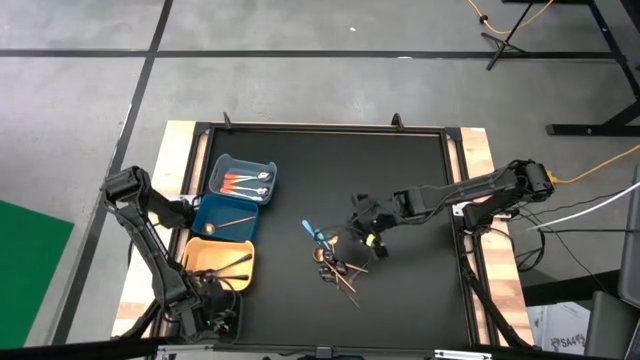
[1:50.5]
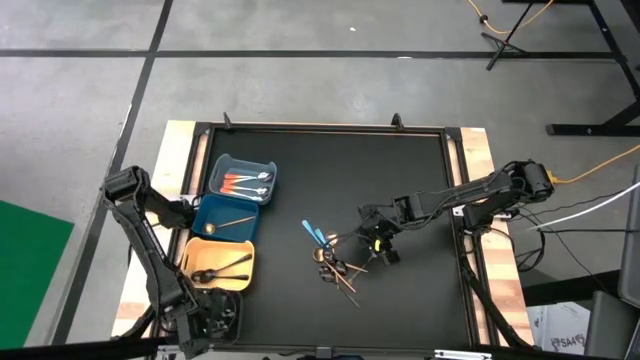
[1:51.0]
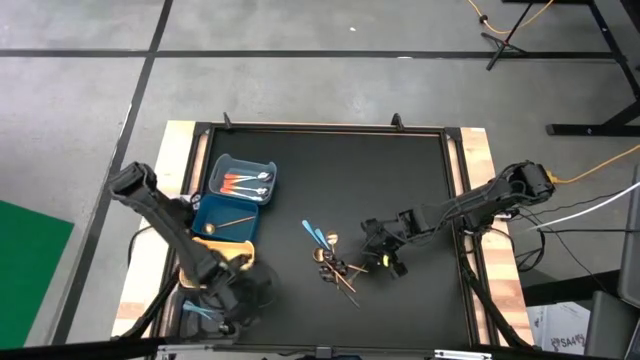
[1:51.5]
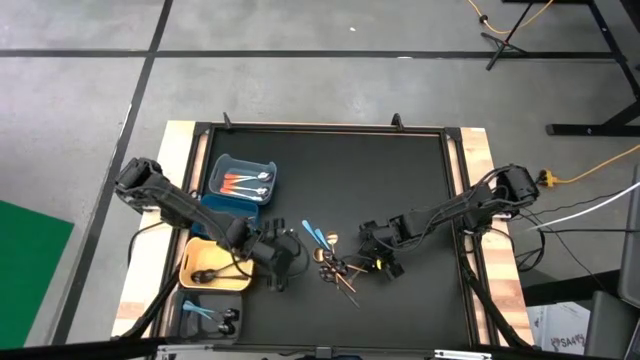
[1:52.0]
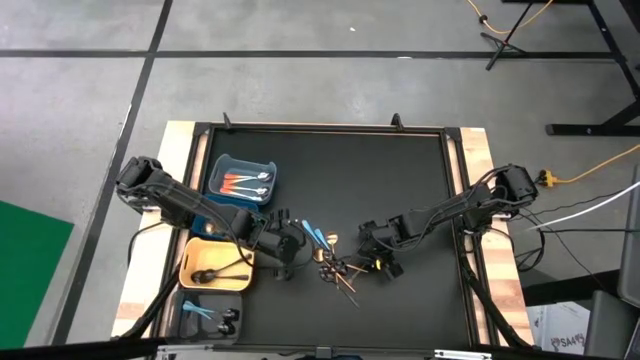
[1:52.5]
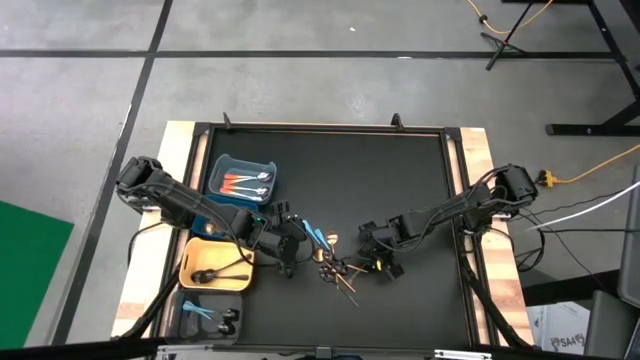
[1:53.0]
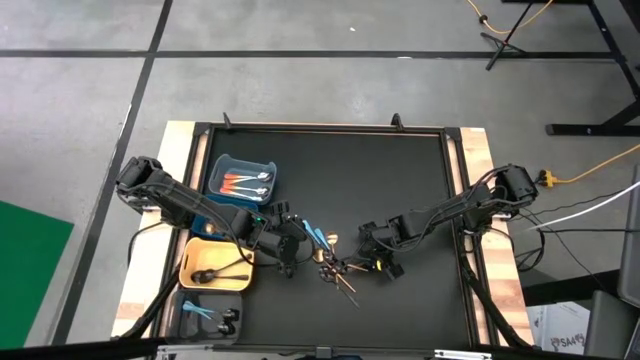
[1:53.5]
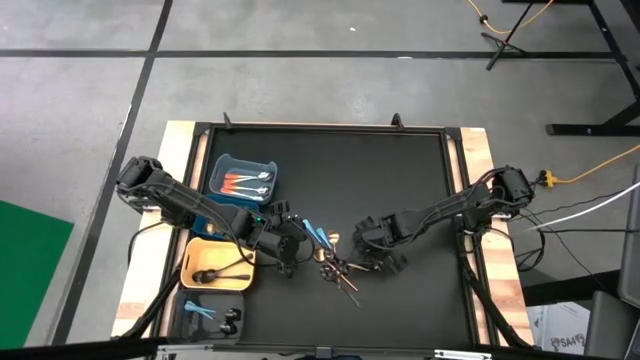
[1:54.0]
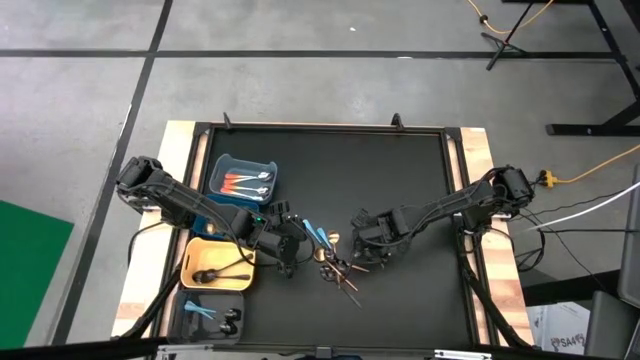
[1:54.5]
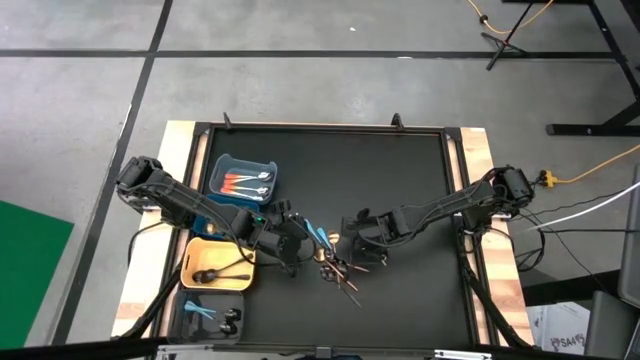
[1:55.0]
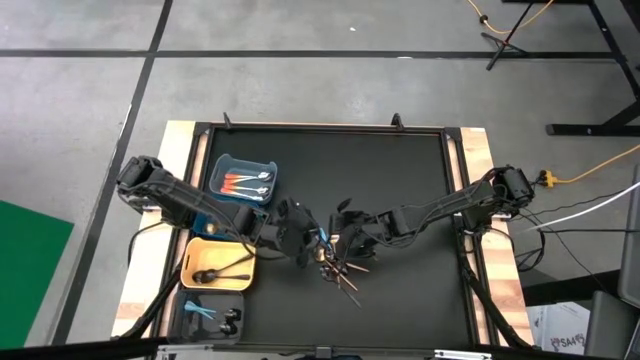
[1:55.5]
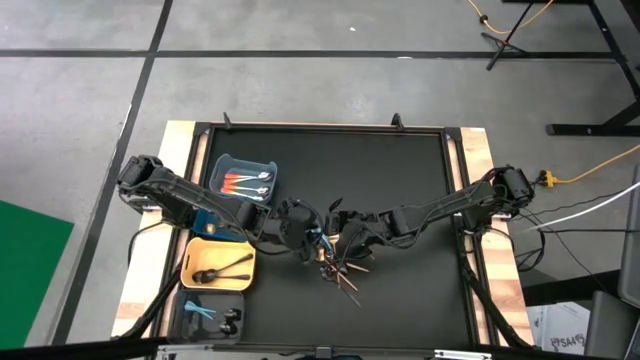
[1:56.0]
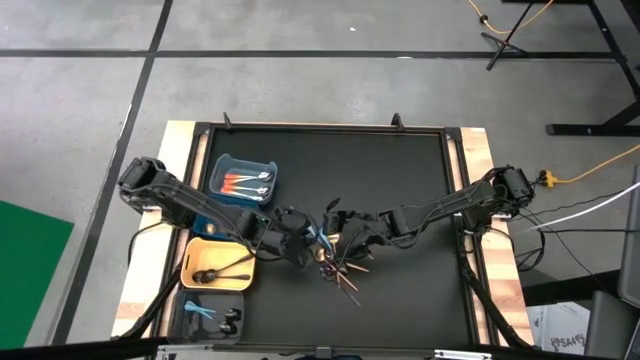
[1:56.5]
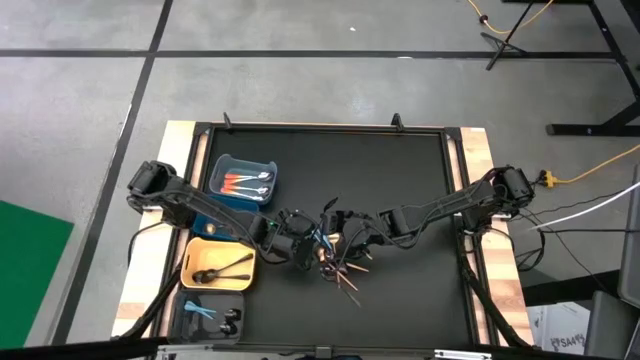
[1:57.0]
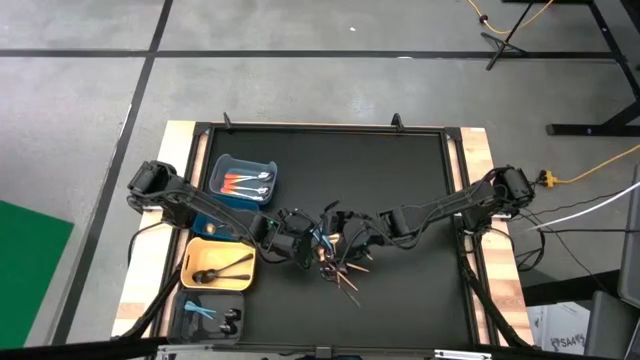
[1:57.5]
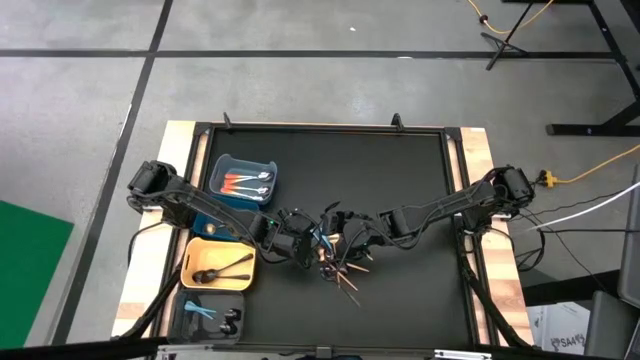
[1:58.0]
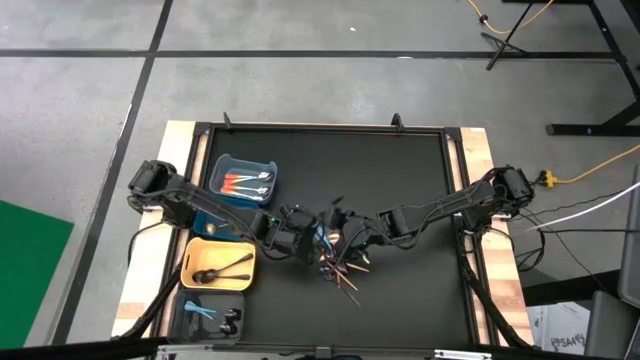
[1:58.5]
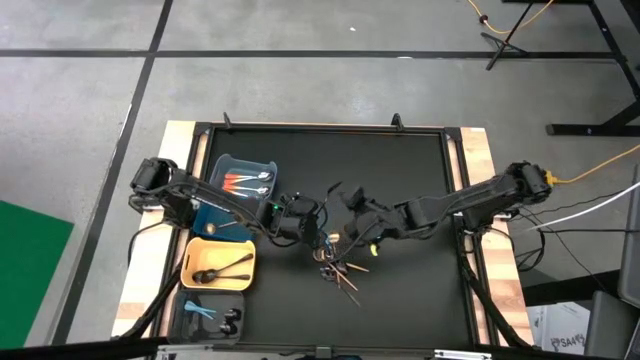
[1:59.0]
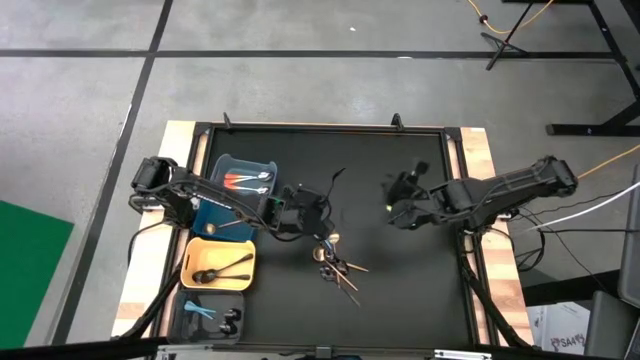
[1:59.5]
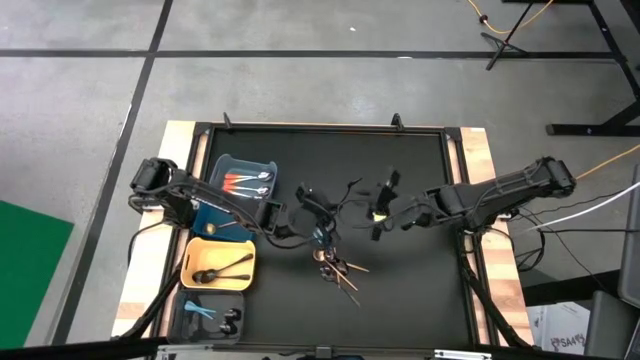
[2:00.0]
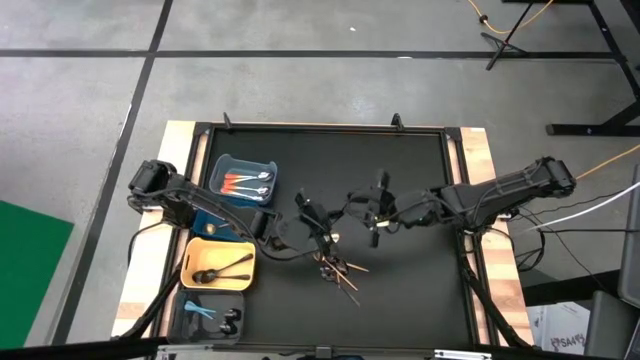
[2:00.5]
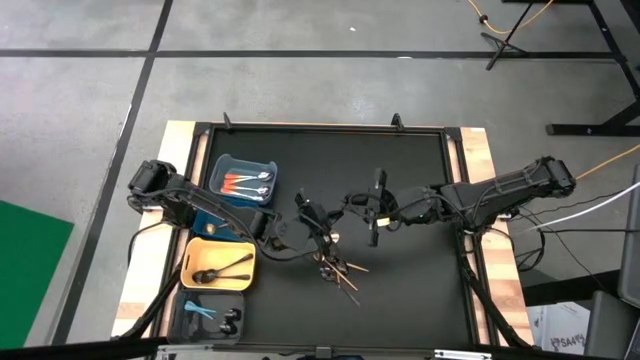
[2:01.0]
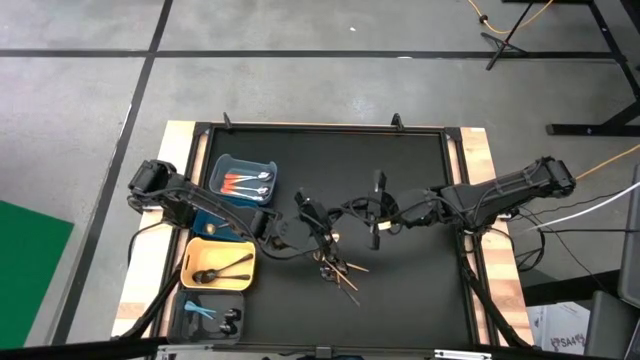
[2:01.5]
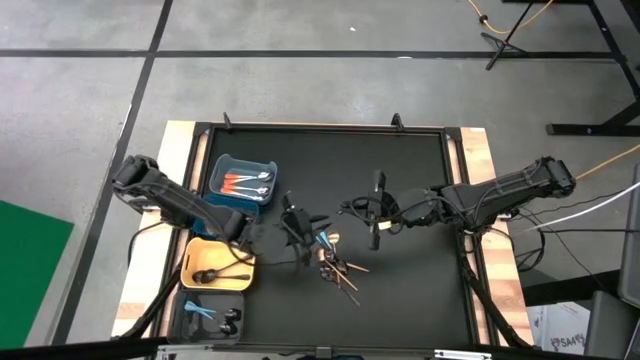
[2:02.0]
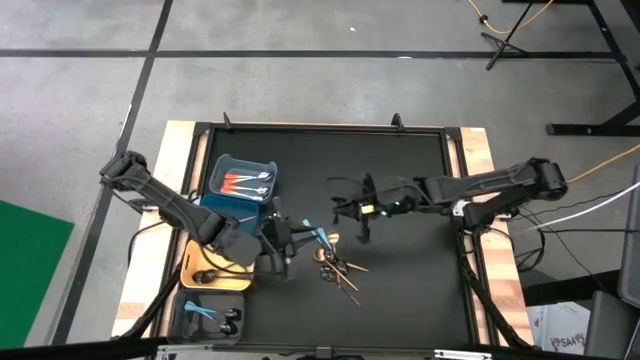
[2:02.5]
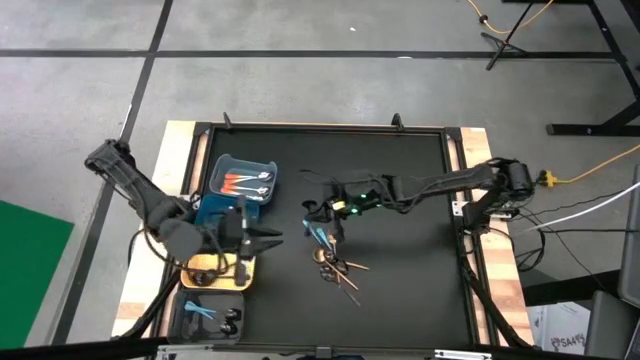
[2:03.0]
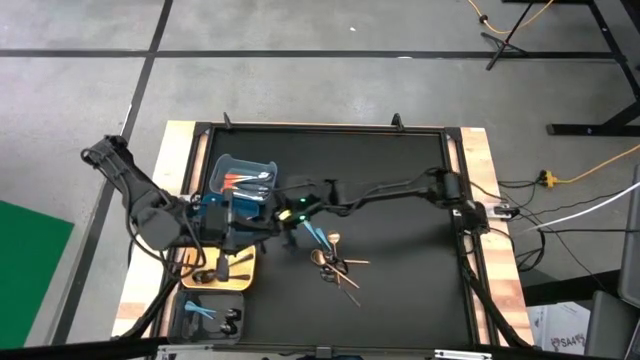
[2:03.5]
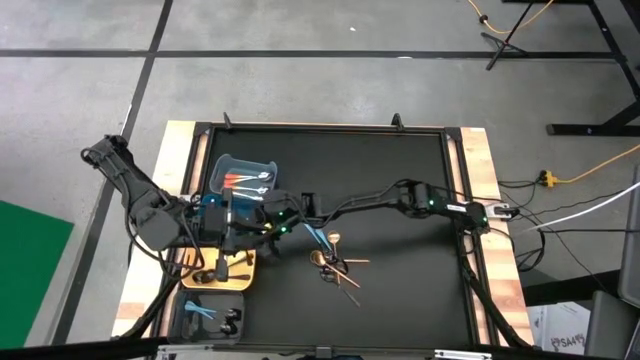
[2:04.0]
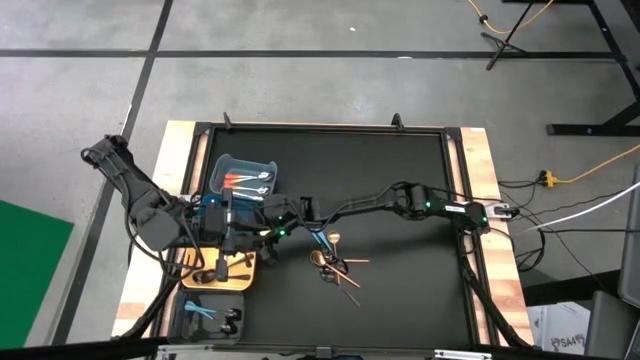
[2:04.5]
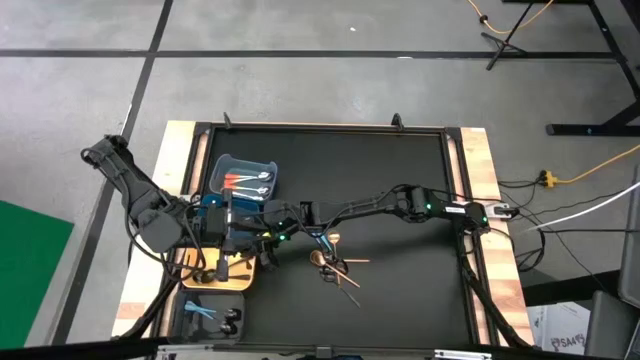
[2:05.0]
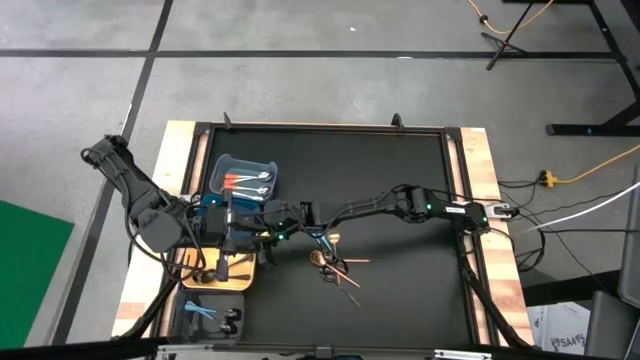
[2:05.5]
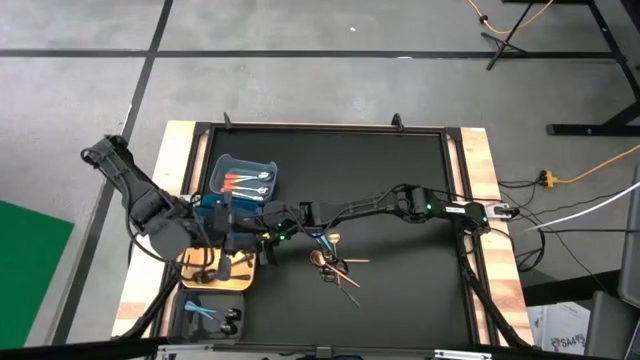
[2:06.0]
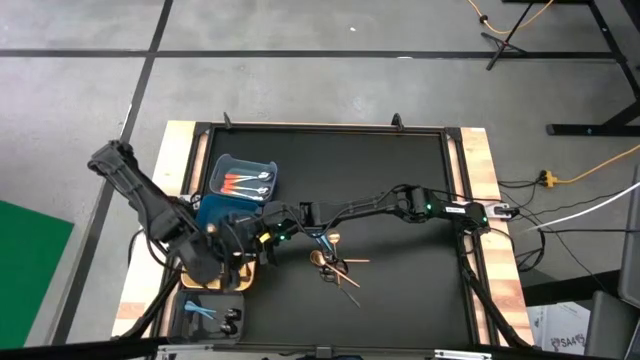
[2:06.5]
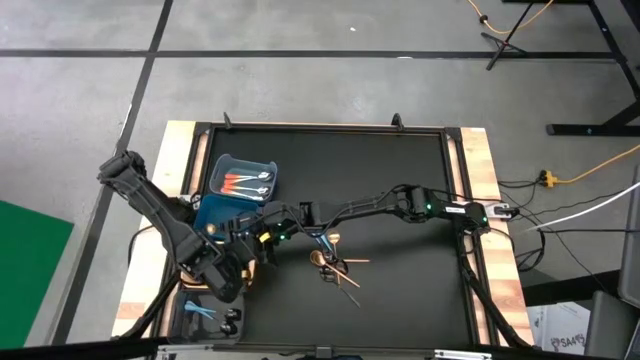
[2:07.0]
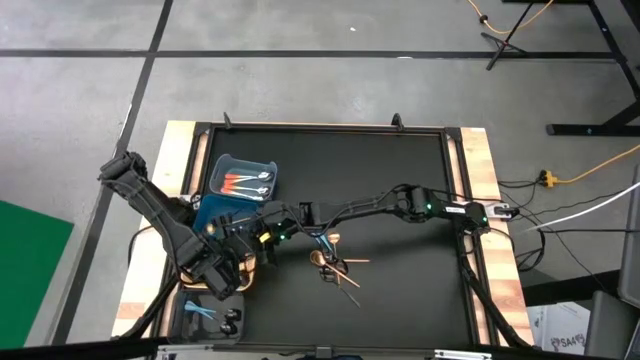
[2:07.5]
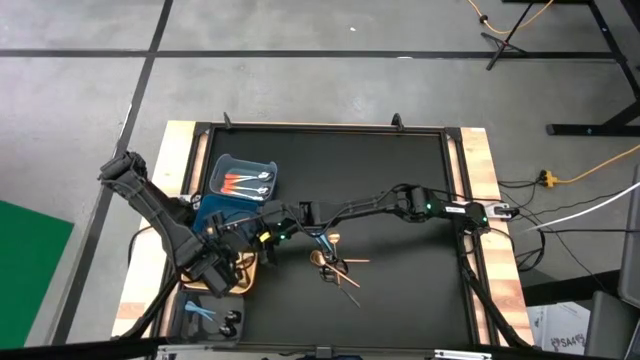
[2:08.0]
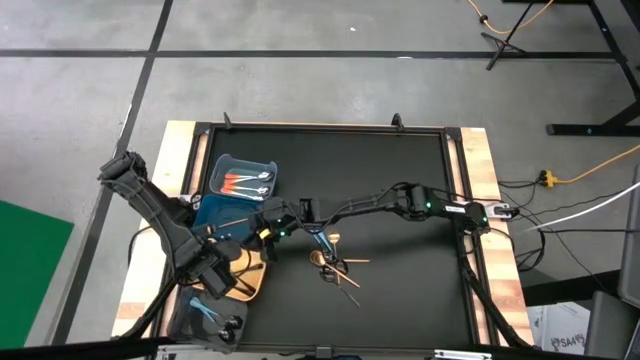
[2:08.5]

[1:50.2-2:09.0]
Task: Sort silverware by color (type)
Put the black spoon into the orange bin

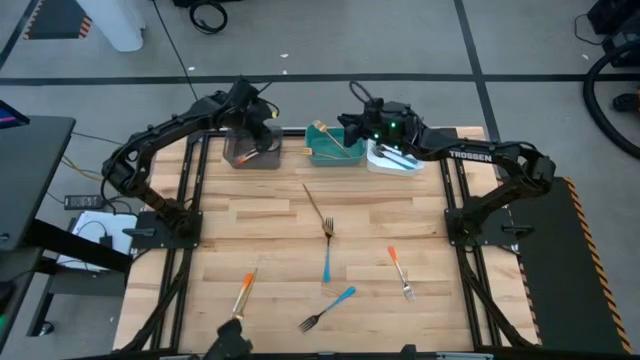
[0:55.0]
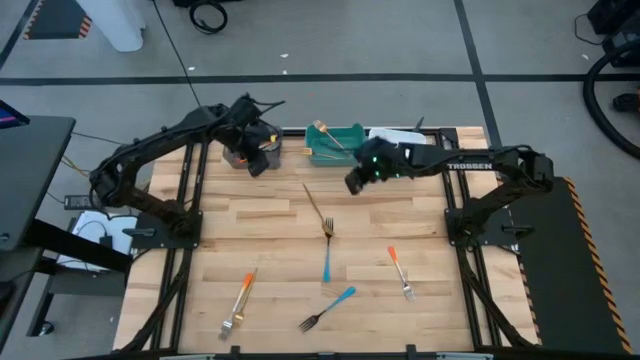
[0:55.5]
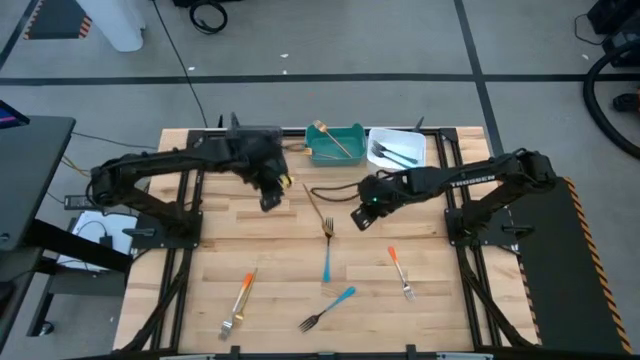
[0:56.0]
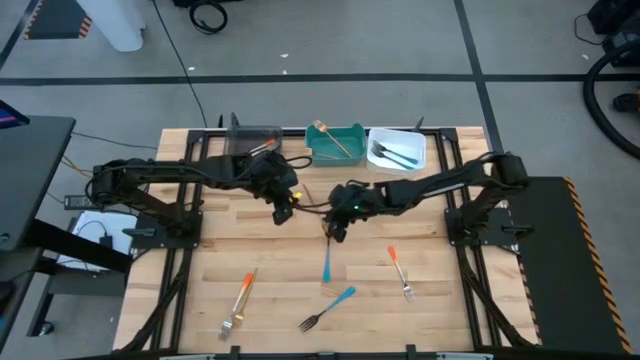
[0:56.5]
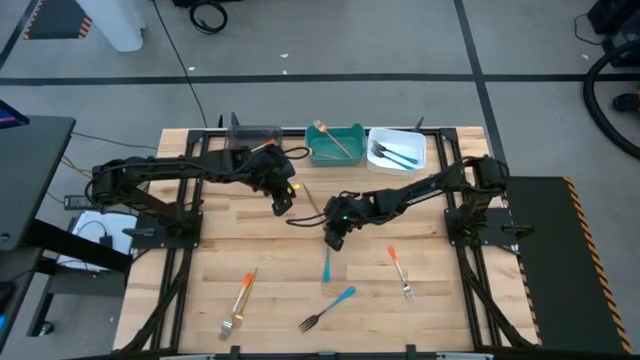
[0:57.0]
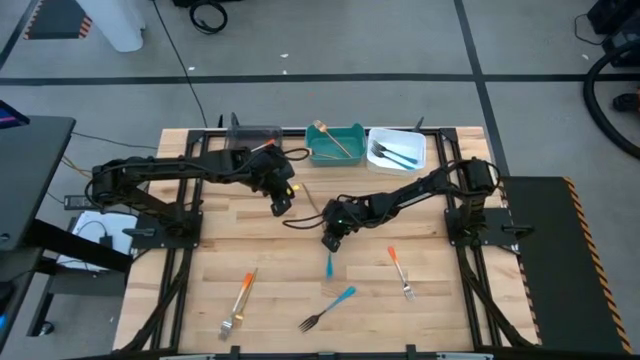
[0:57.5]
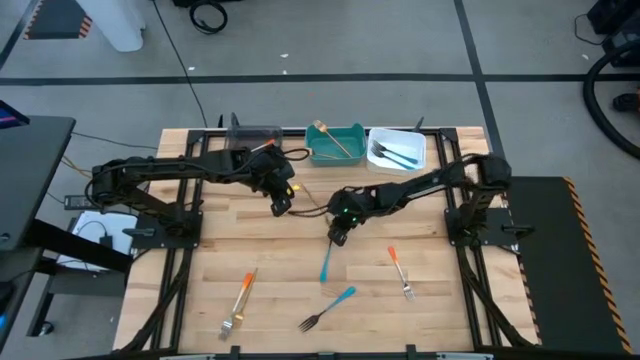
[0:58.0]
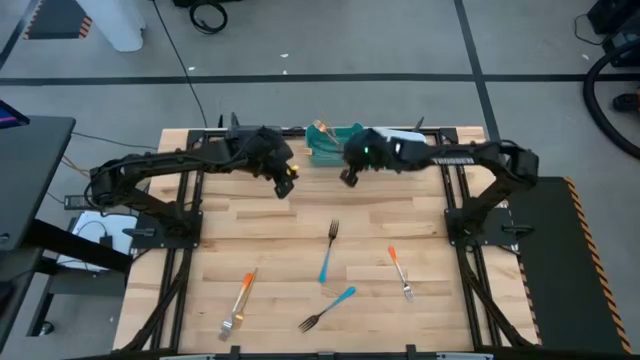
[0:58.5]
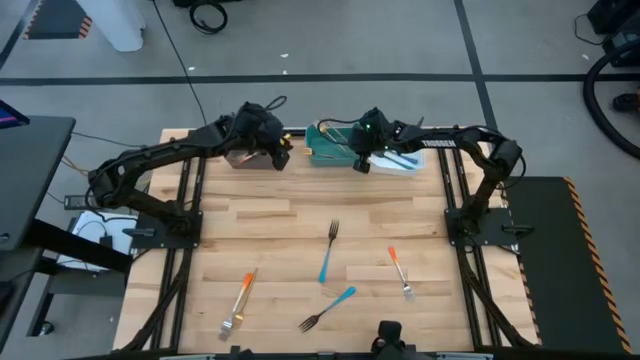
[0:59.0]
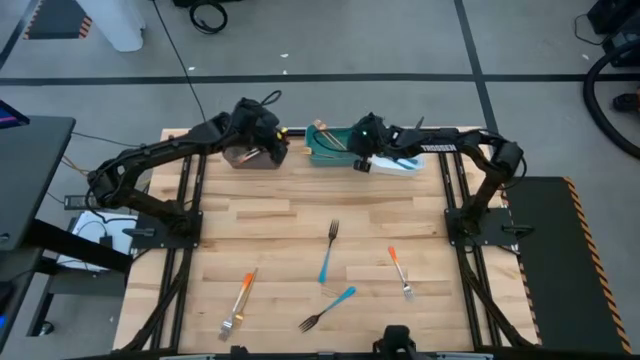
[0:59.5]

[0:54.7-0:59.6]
Task: Sort silverware by color (type)
Put the top gold fork into the green bin
